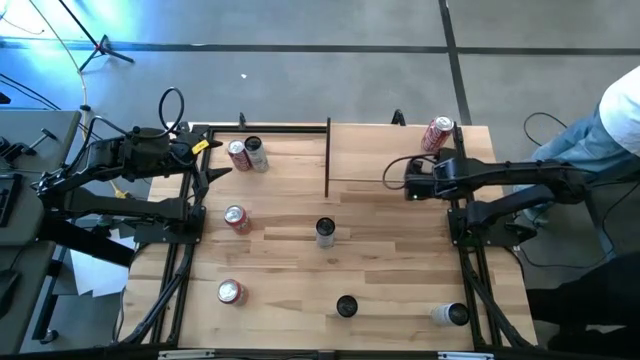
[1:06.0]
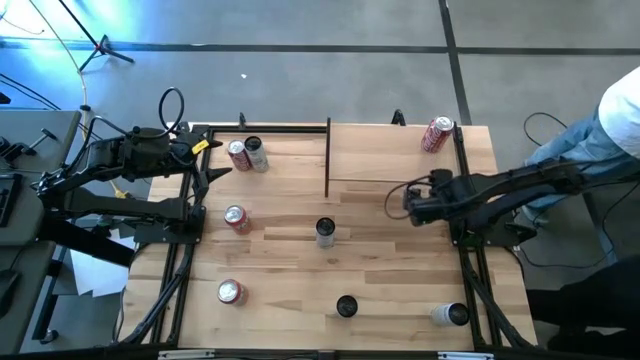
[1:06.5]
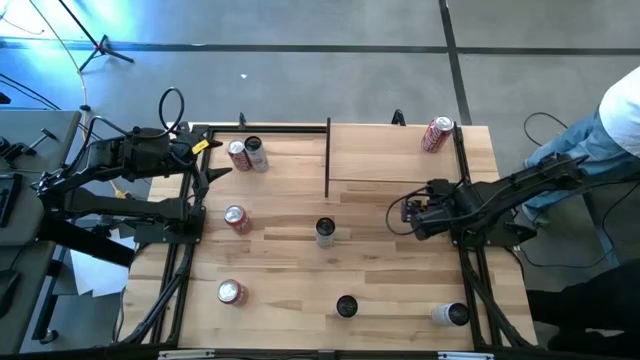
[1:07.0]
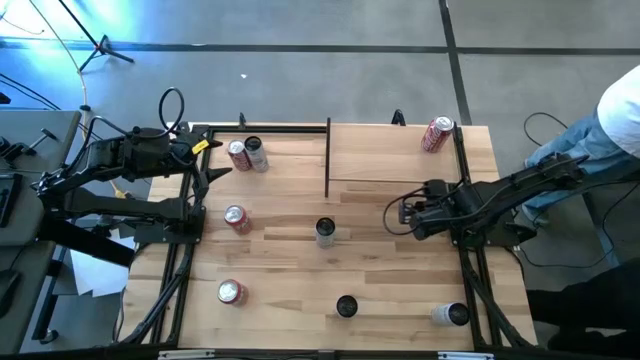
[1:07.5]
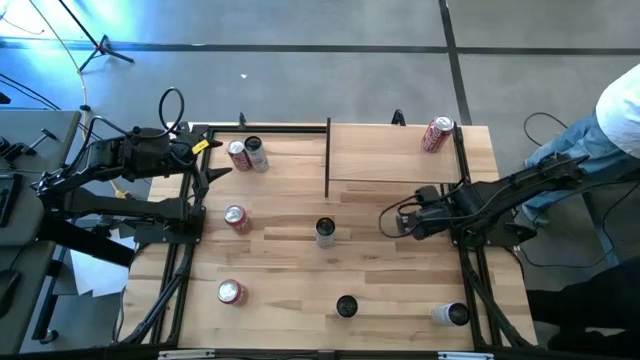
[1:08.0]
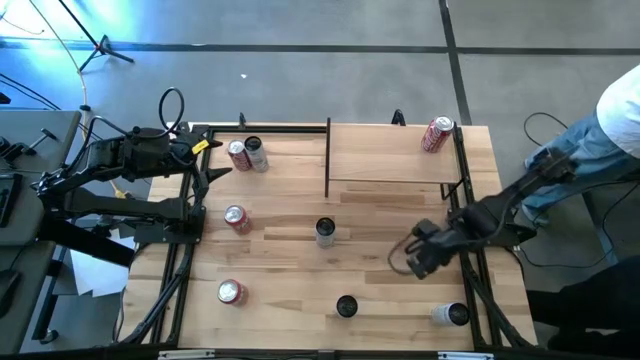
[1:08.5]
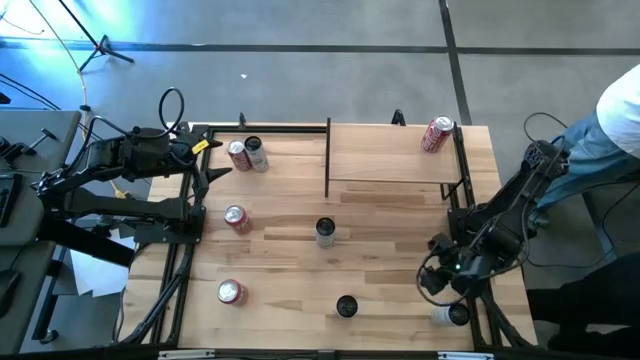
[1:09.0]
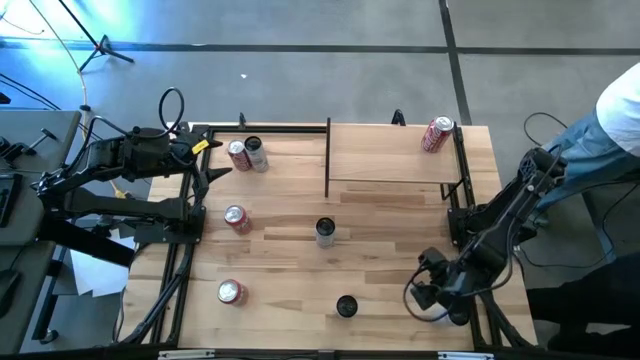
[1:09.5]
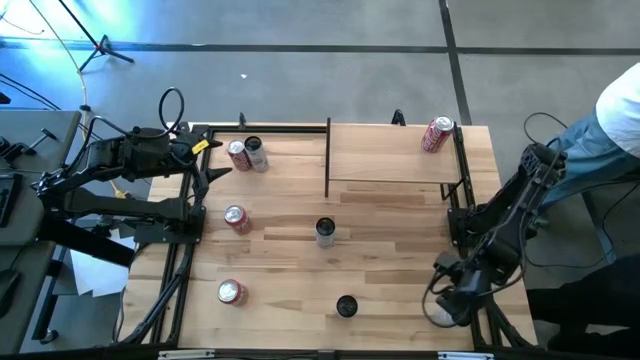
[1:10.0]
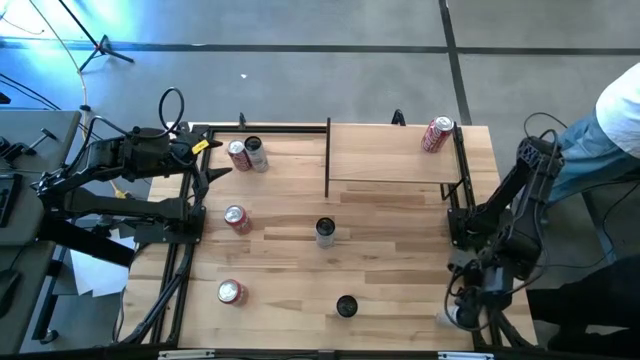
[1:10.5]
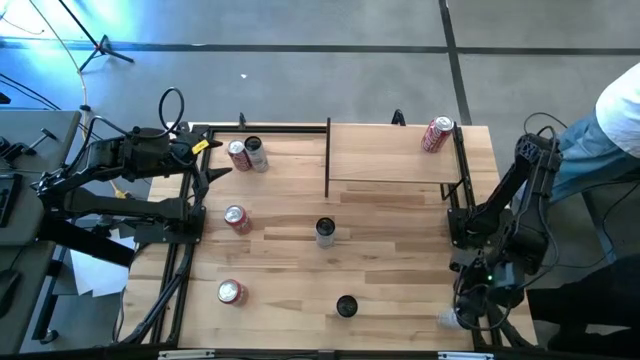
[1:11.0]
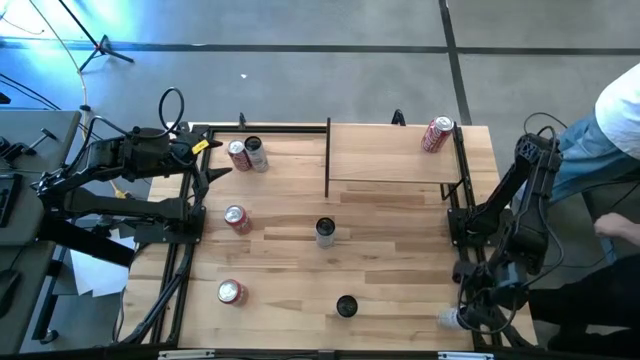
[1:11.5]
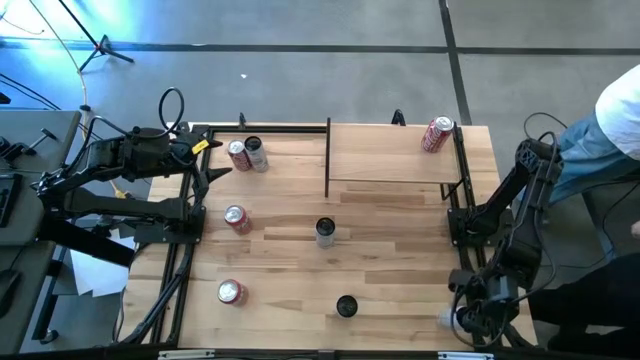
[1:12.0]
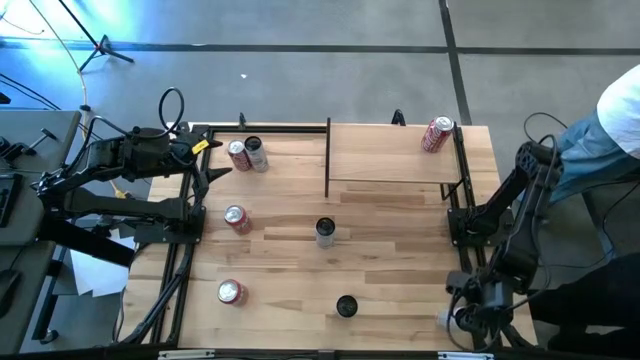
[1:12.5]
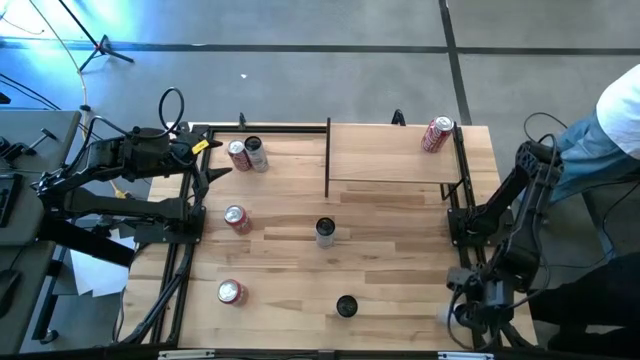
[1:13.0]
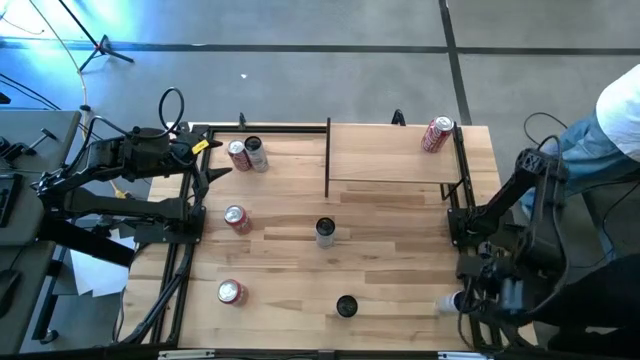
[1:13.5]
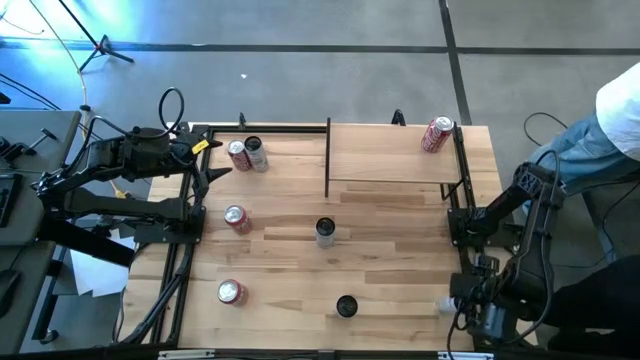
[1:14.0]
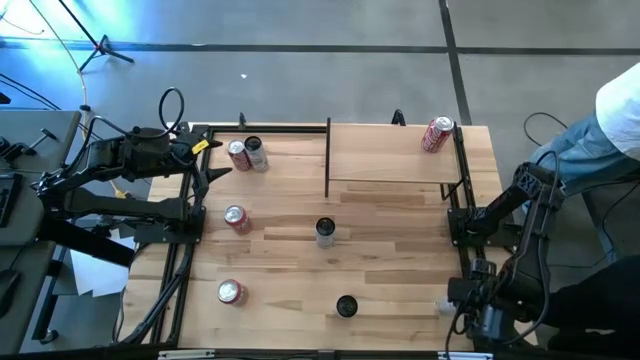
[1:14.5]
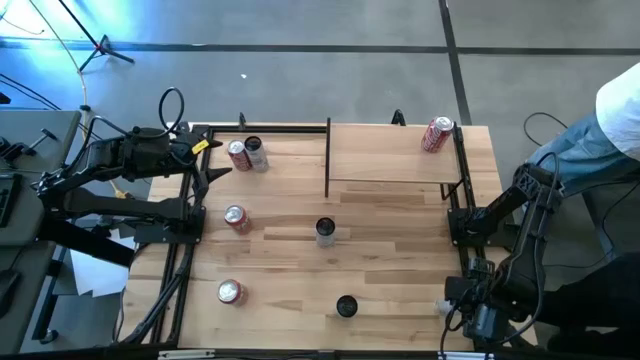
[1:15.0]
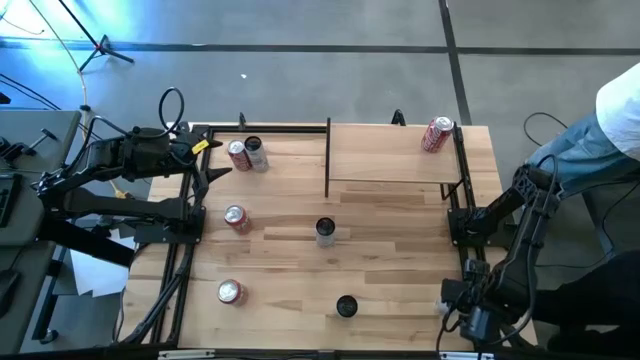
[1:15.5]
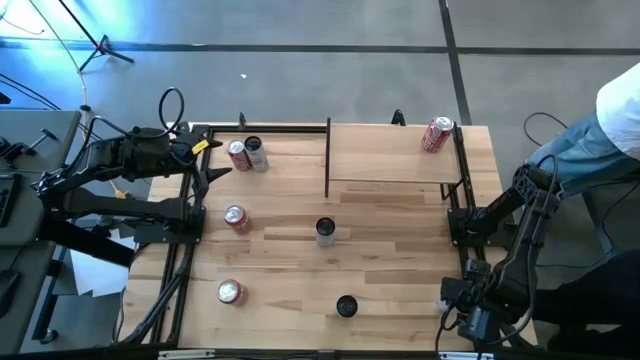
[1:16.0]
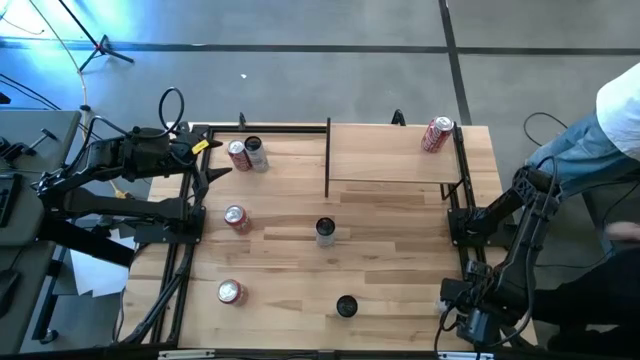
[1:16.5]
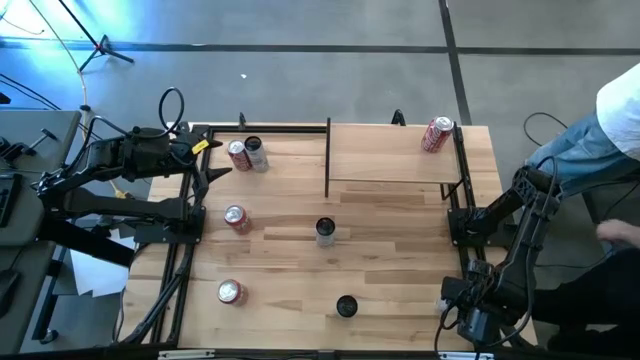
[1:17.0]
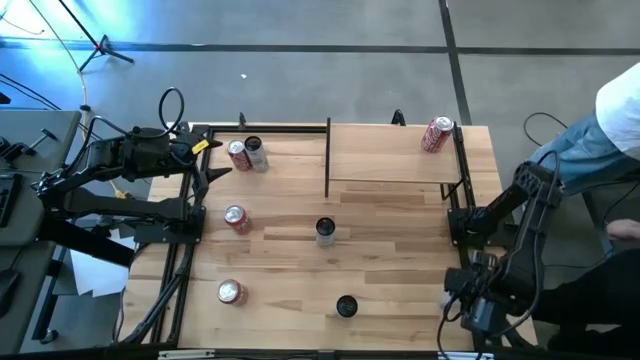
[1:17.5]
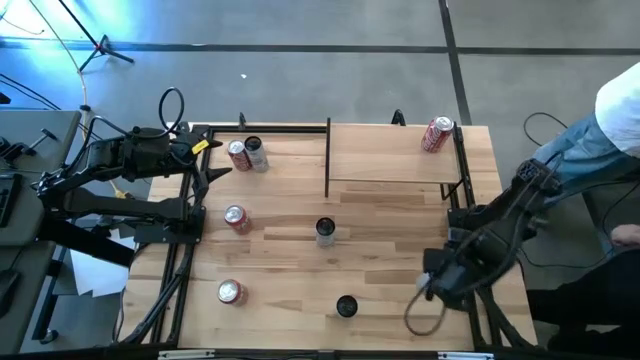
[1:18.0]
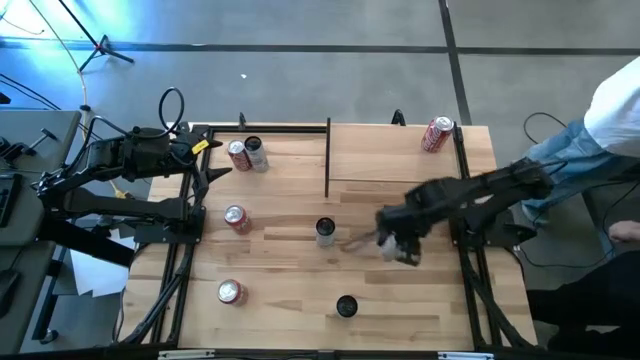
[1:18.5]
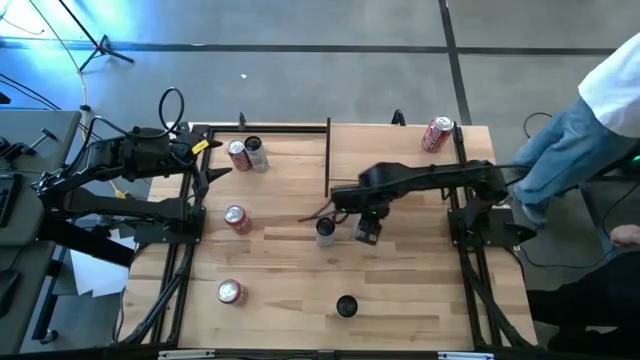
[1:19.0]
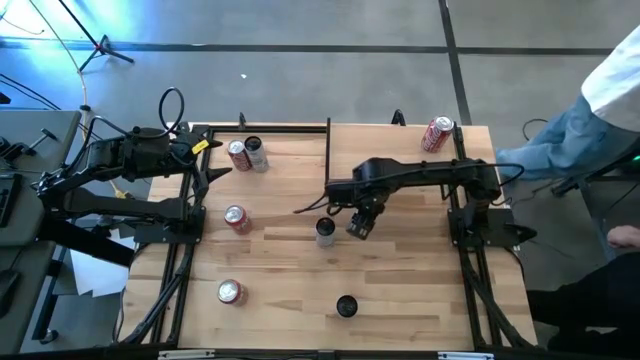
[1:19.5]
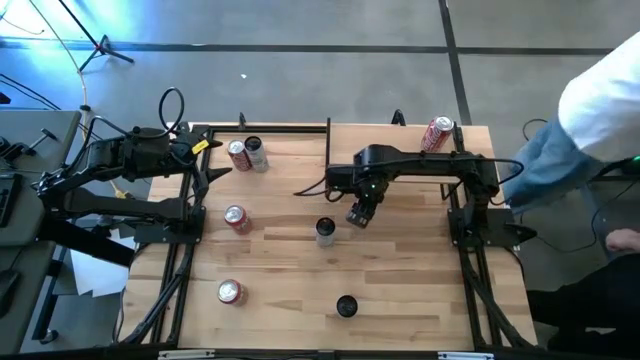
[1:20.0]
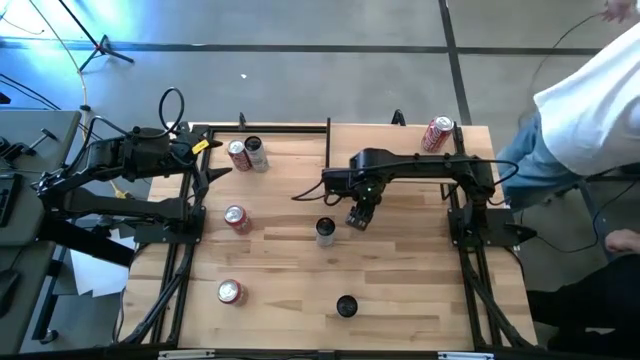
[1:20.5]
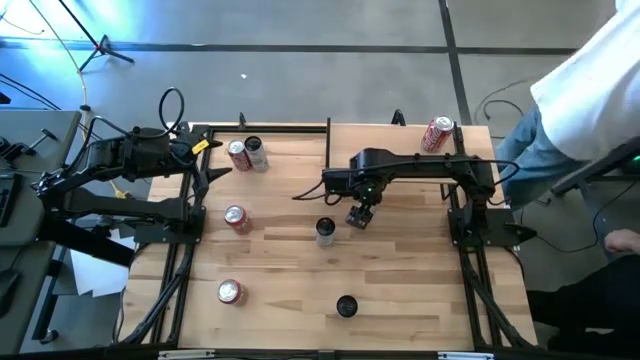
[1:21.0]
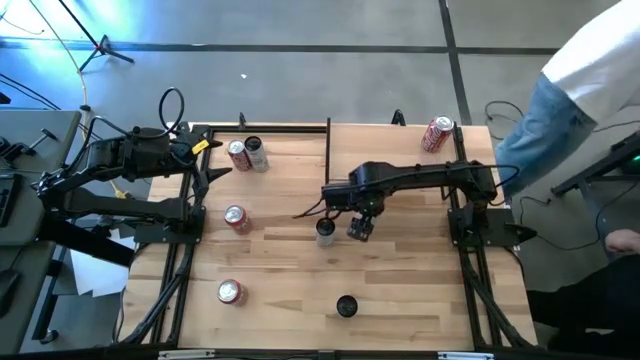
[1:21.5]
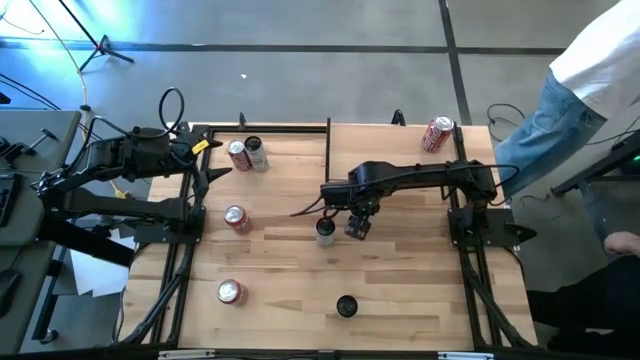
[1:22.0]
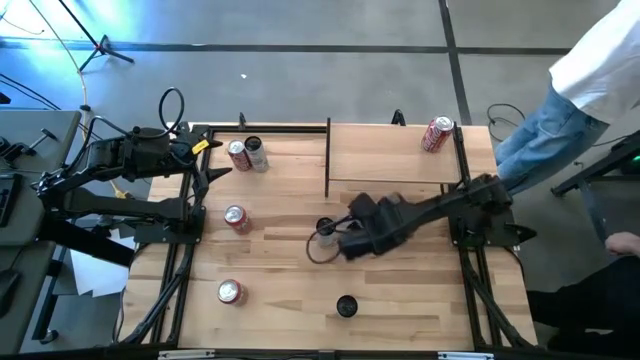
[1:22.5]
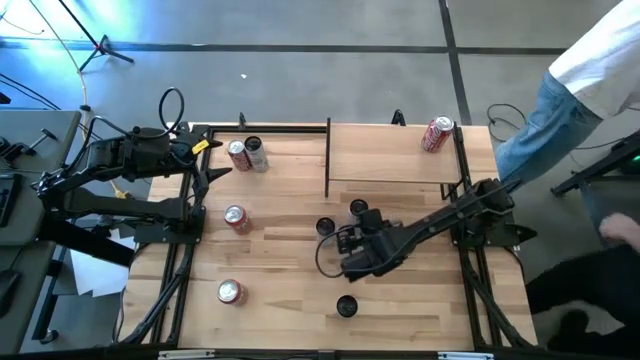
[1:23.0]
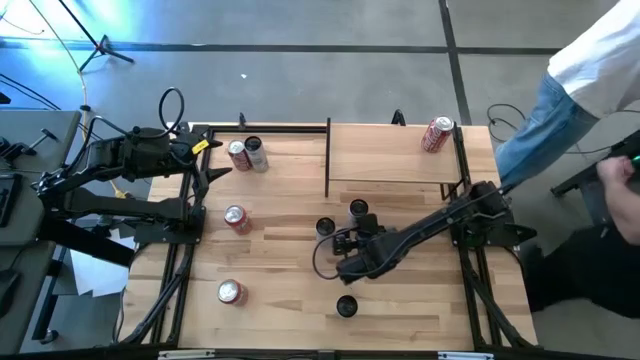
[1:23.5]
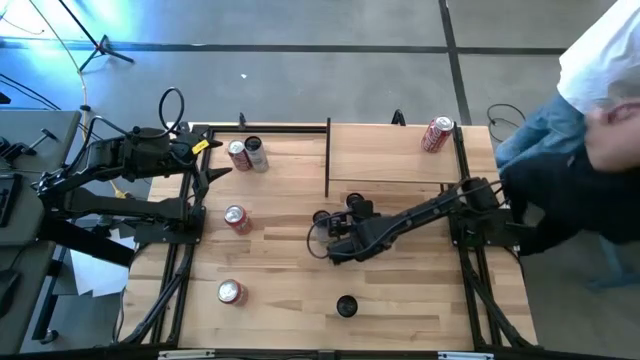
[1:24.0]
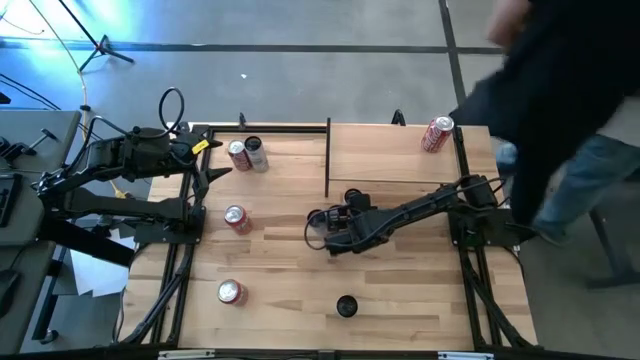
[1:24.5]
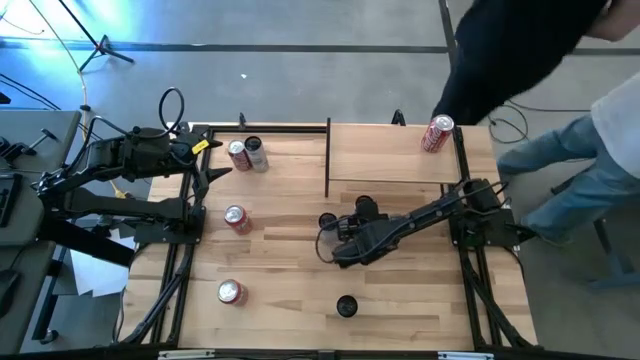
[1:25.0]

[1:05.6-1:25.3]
Task: Place canned beverage on shelf
Put the white soda can on the shelf

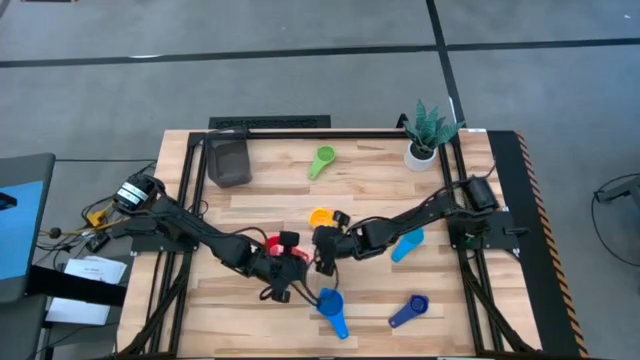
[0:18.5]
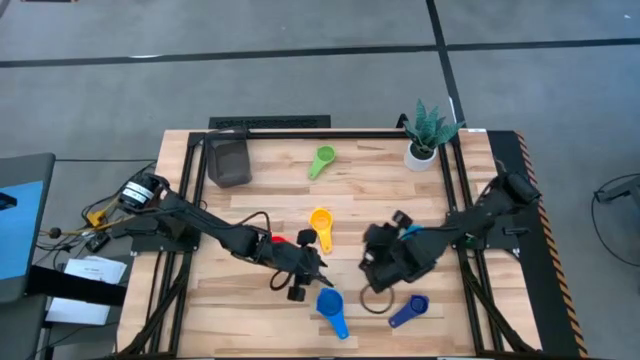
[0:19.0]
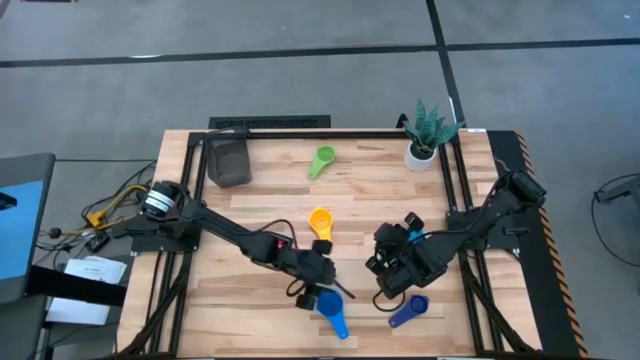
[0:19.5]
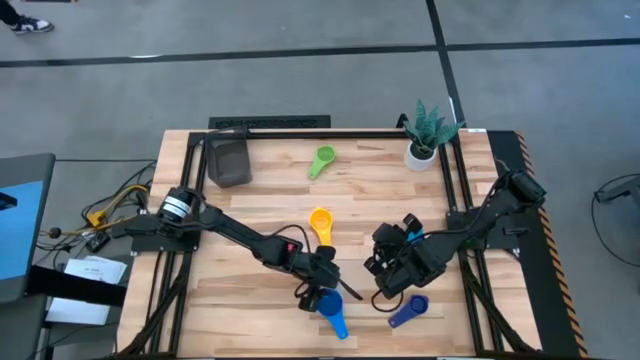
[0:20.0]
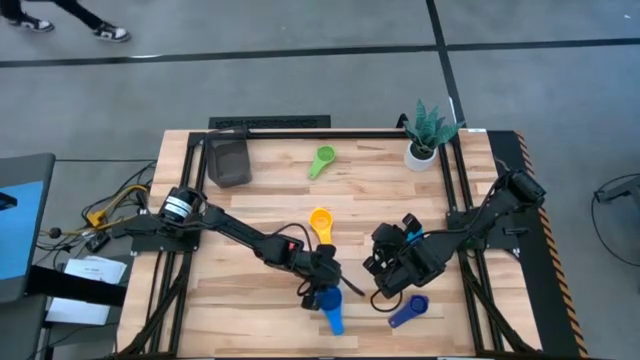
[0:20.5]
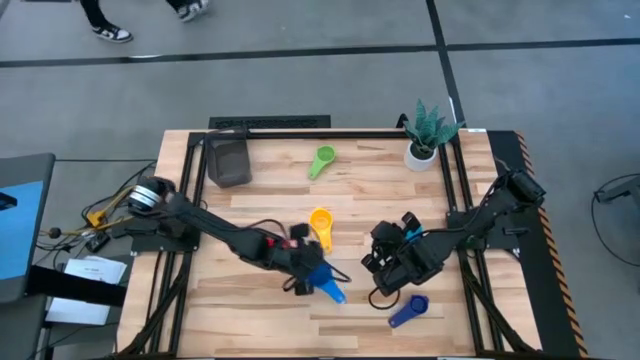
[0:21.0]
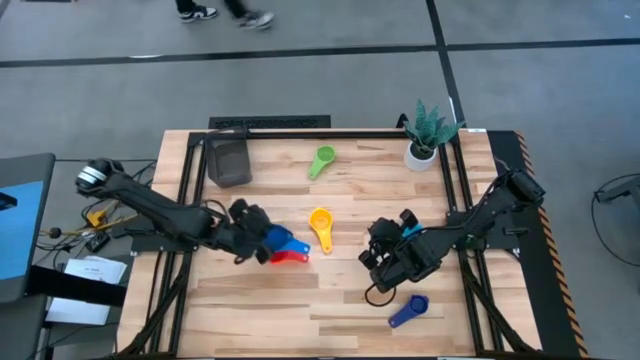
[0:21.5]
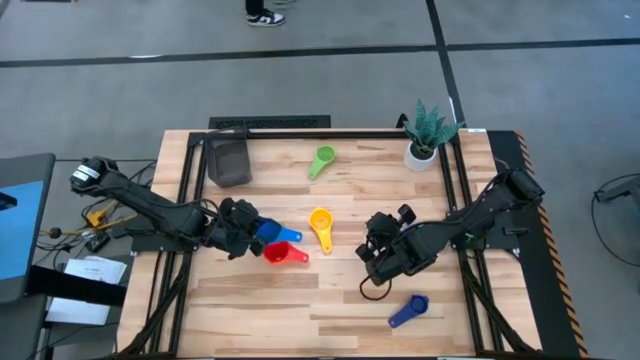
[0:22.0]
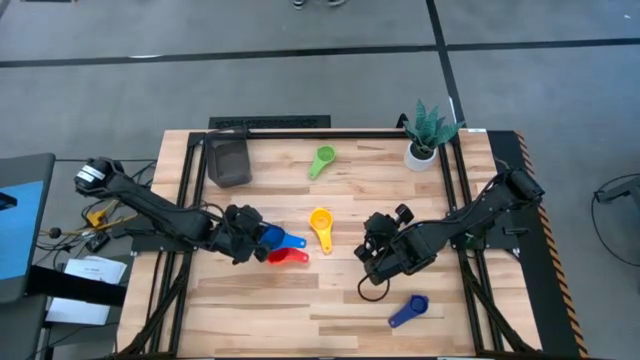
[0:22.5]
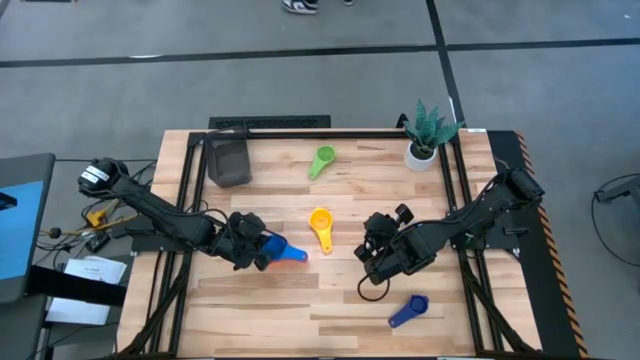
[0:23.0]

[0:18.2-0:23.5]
Task: Nest measuring cups in basket
Stack the blue measuring cup on top of the orange measuring cup
